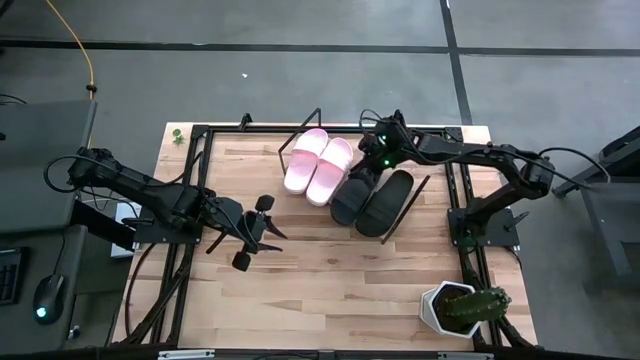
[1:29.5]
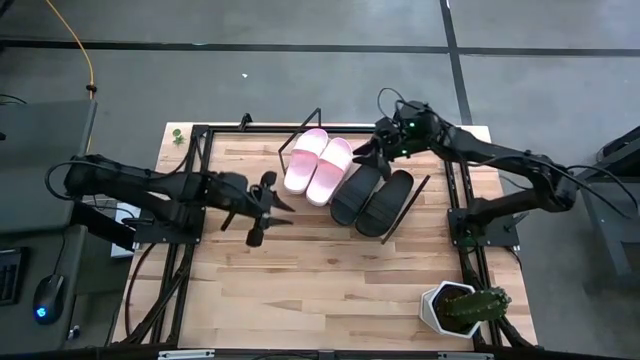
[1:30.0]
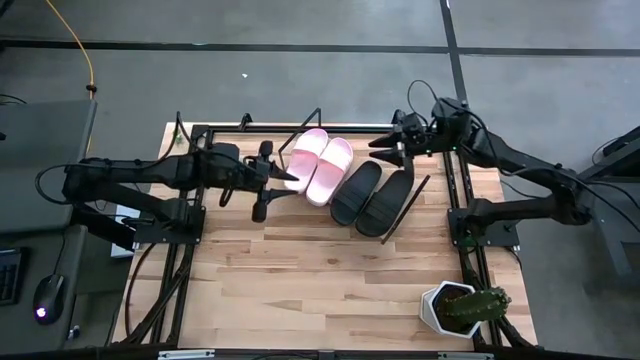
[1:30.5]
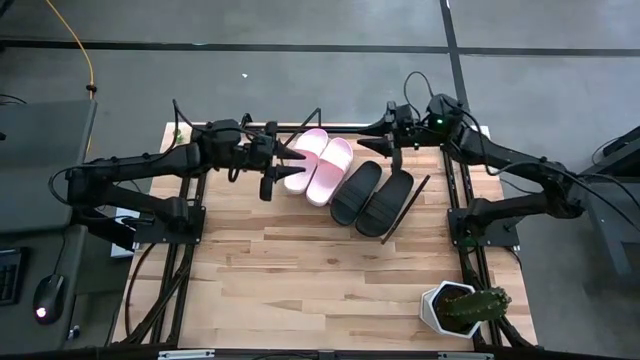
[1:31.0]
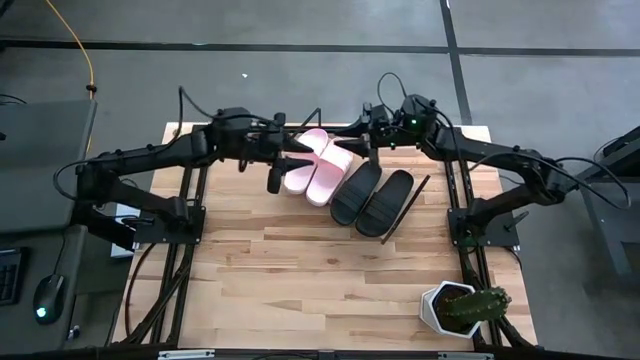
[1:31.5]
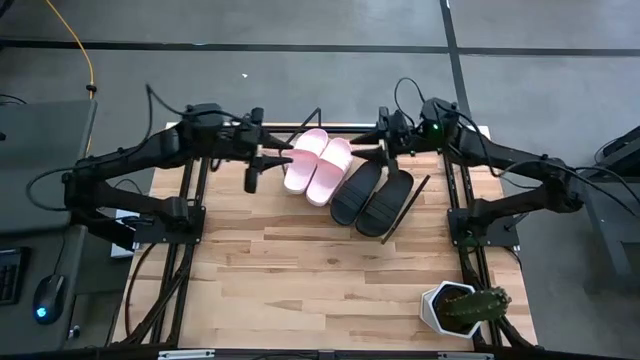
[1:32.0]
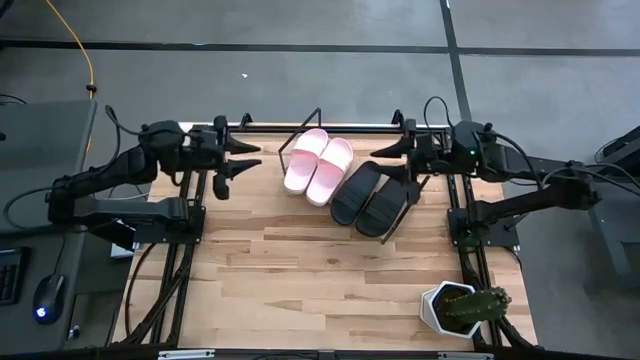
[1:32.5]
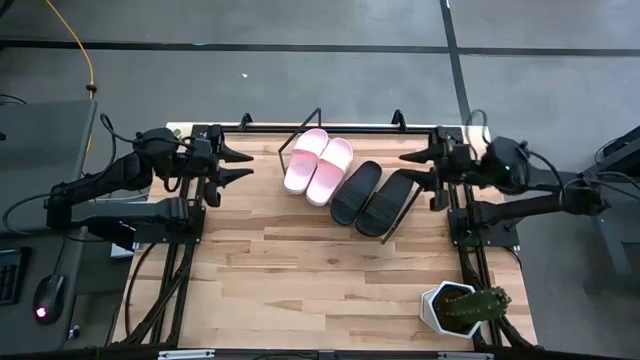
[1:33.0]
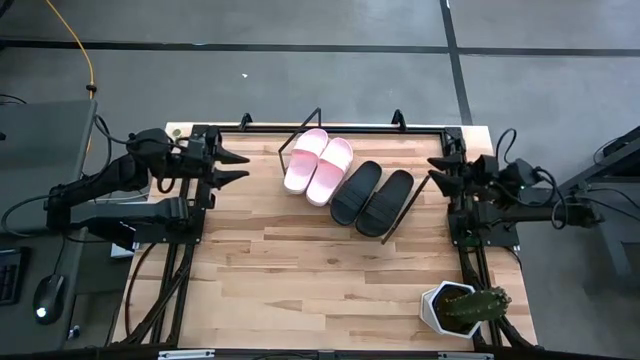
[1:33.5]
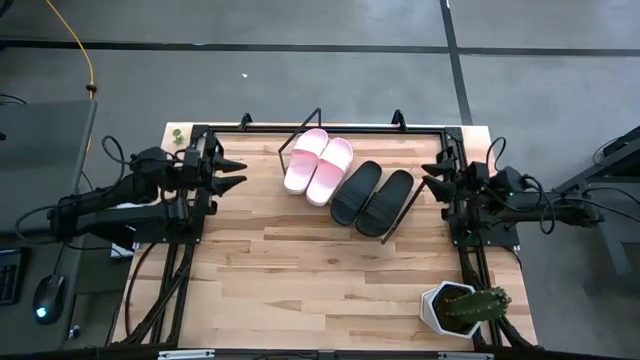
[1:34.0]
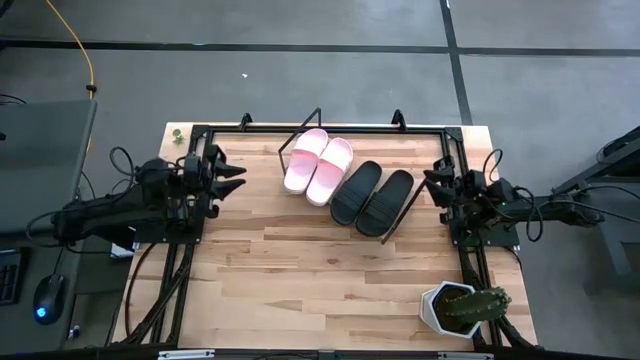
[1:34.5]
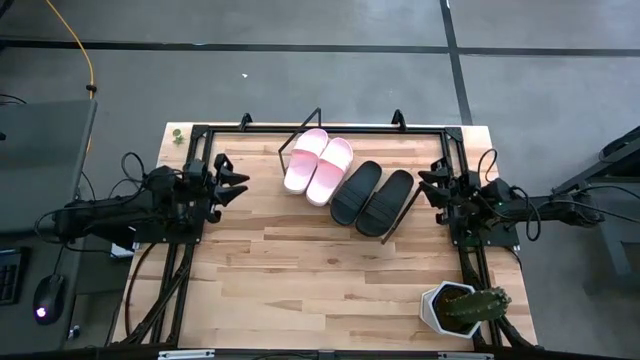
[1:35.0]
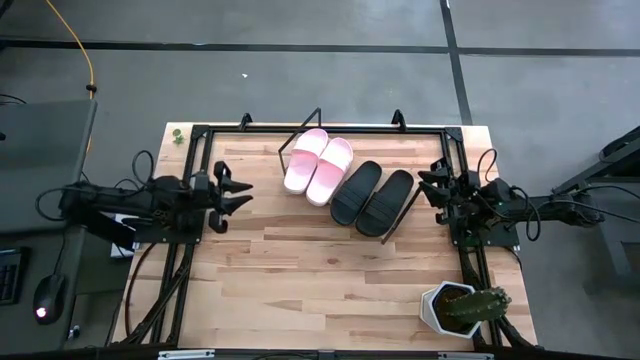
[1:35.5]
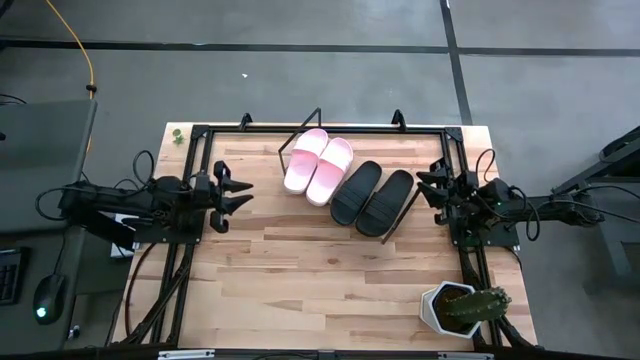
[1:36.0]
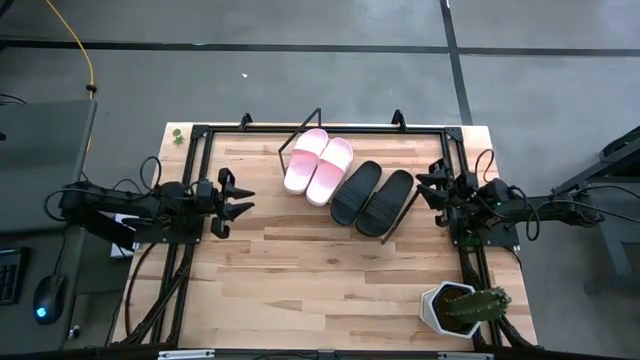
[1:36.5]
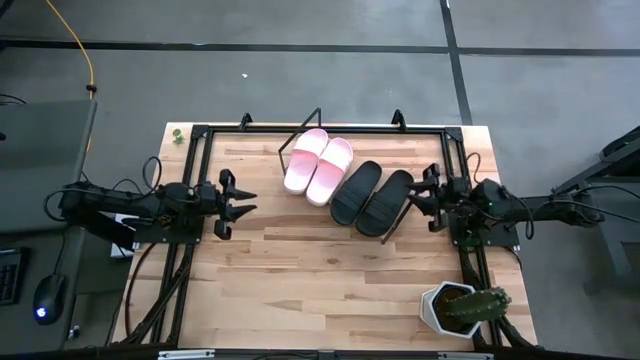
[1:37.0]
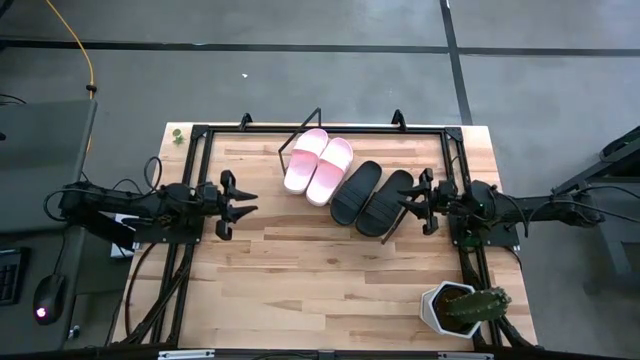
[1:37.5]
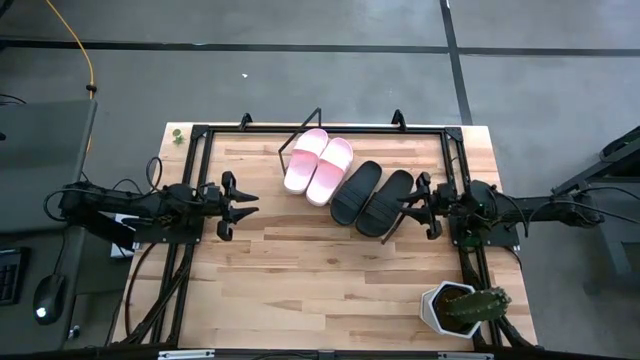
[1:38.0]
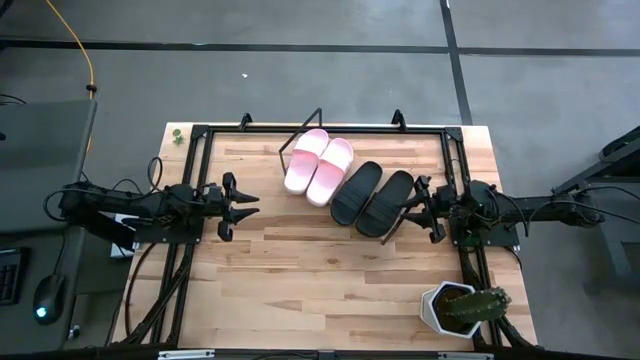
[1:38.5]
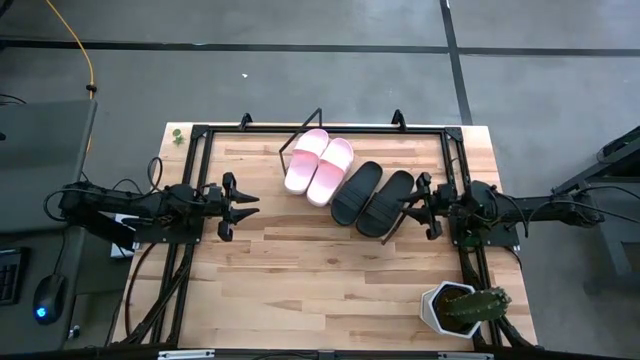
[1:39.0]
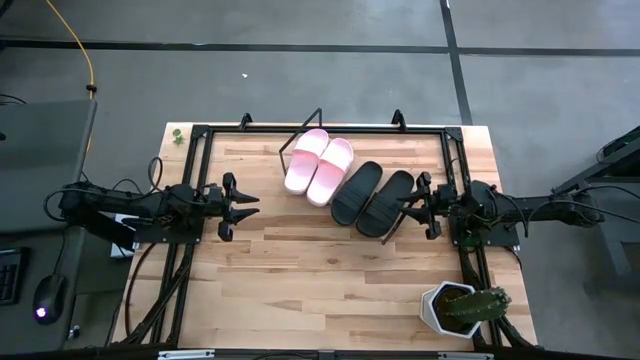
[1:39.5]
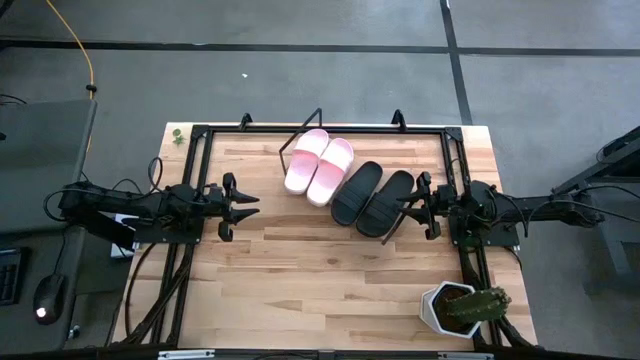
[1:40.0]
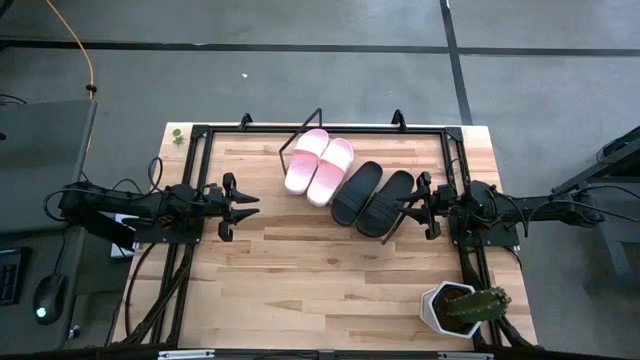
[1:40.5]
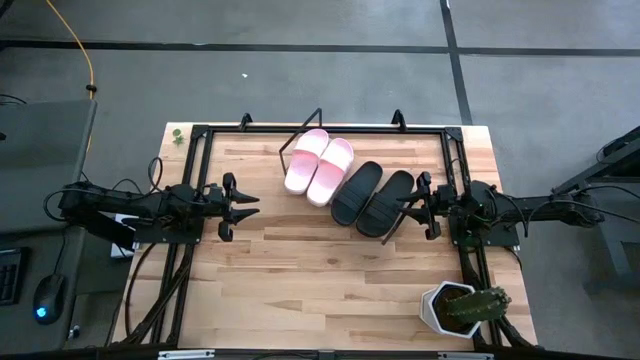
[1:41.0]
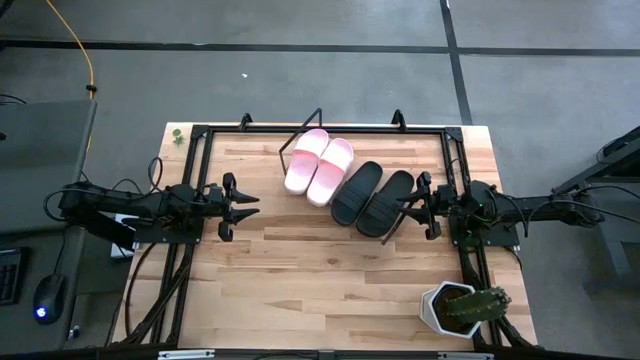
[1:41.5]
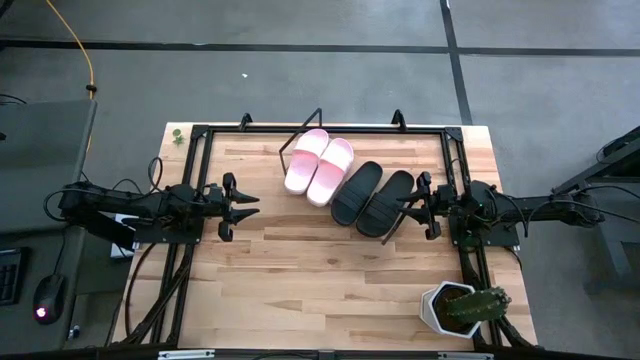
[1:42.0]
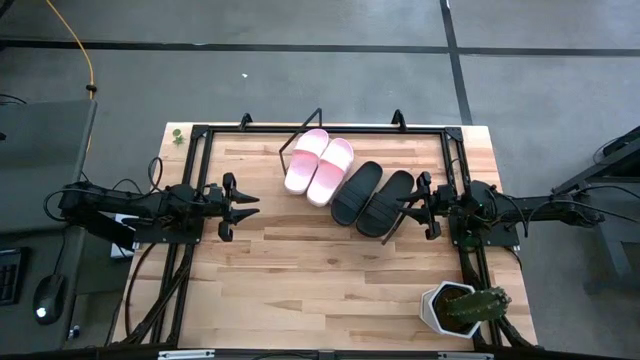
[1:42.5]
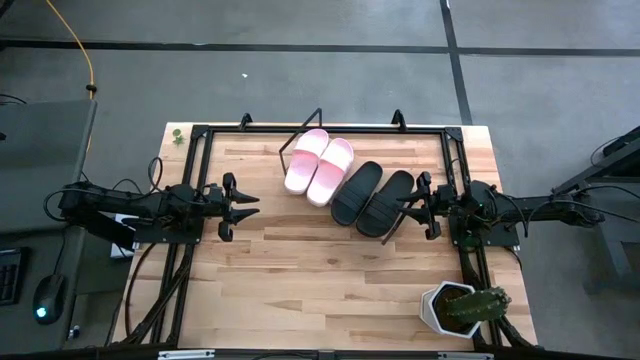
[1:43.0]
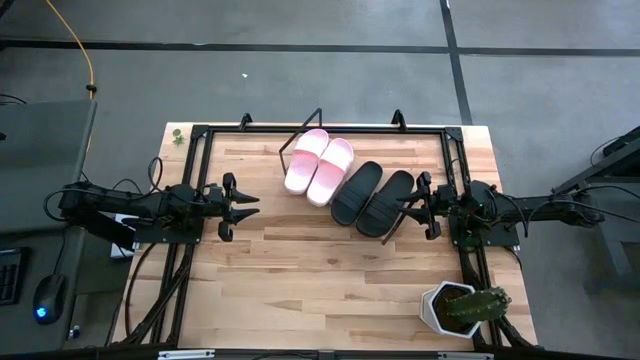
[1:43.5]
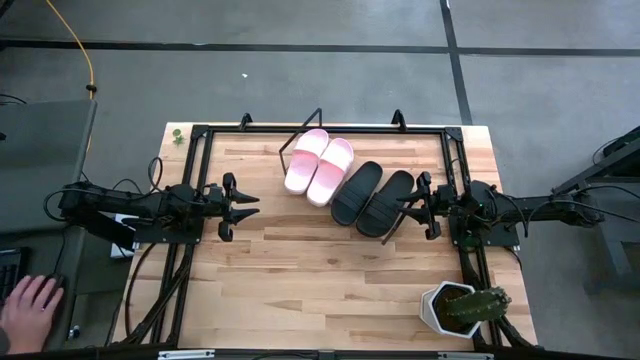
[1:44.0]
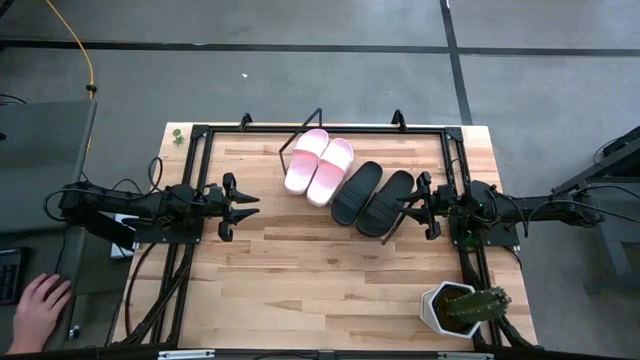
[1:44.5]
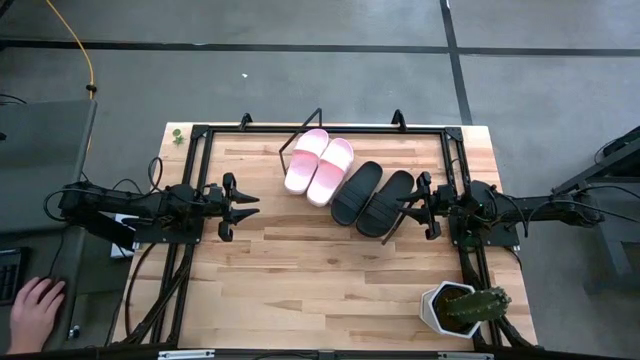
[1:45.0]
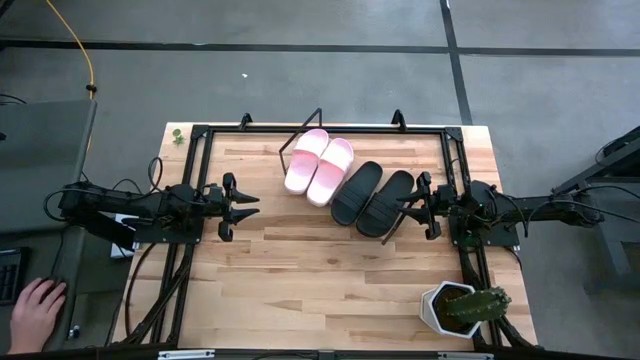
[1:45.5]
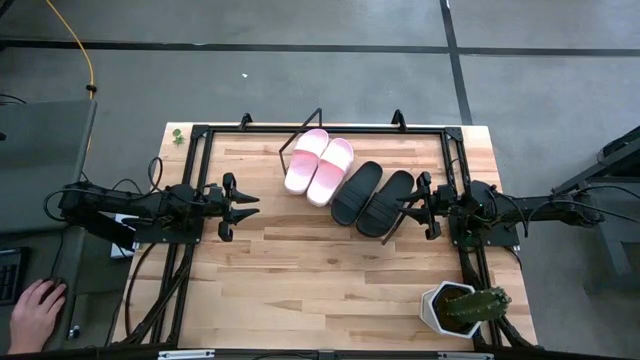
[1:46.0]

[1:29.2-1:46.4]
Task: Pick and place slides into the shelf
Return to Home Position

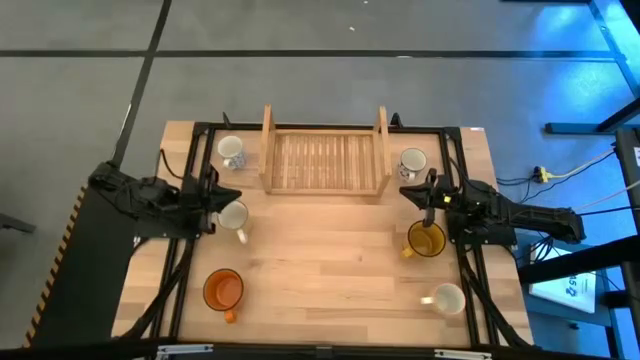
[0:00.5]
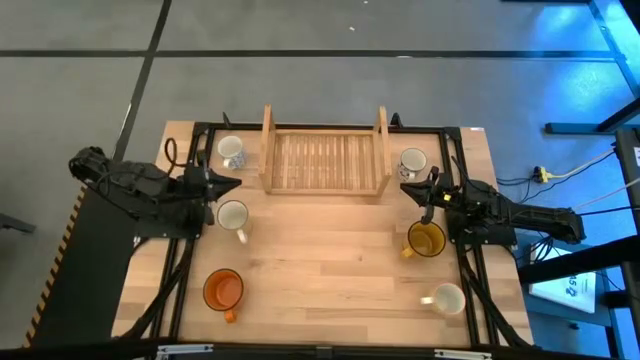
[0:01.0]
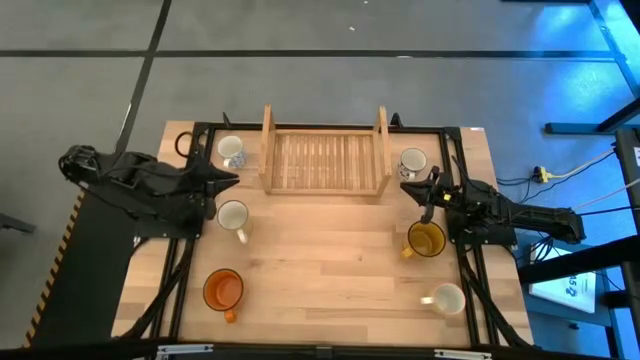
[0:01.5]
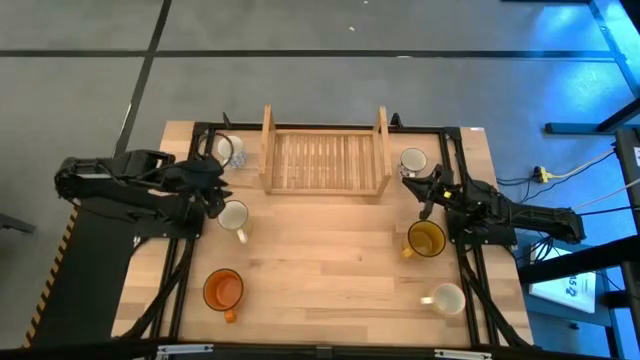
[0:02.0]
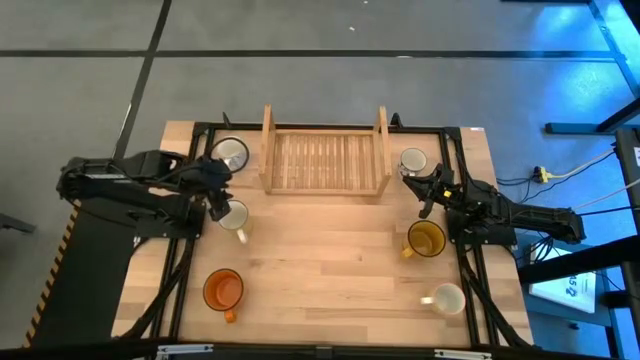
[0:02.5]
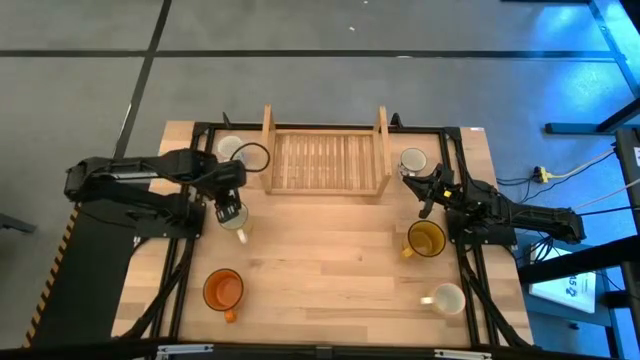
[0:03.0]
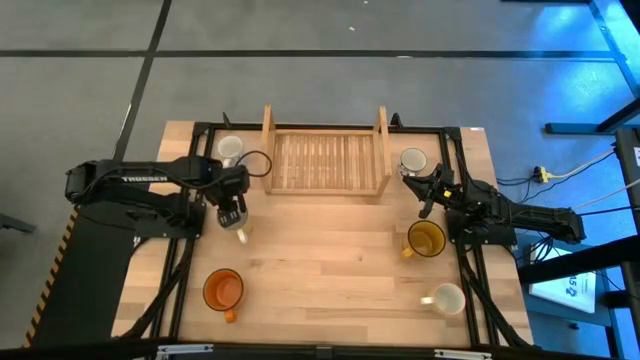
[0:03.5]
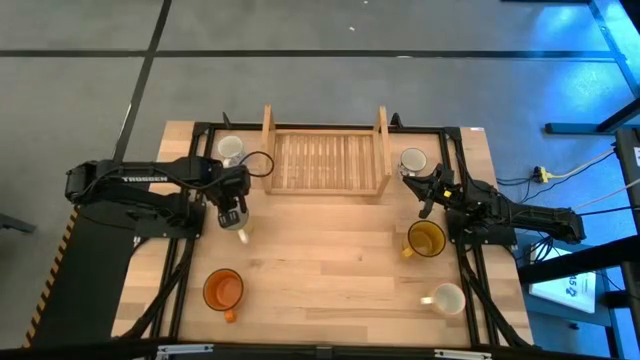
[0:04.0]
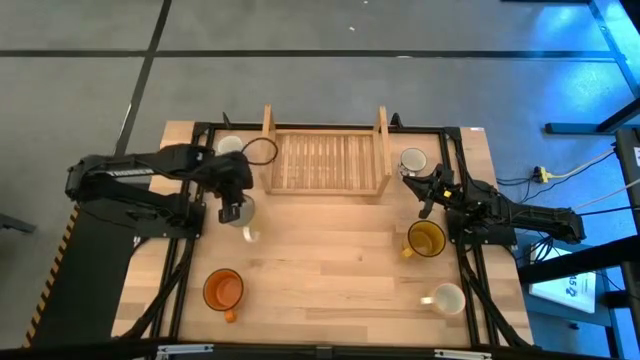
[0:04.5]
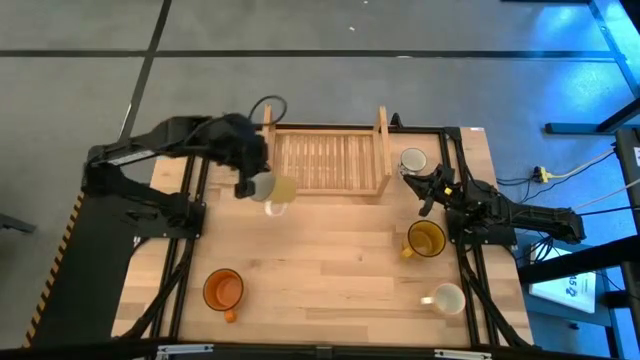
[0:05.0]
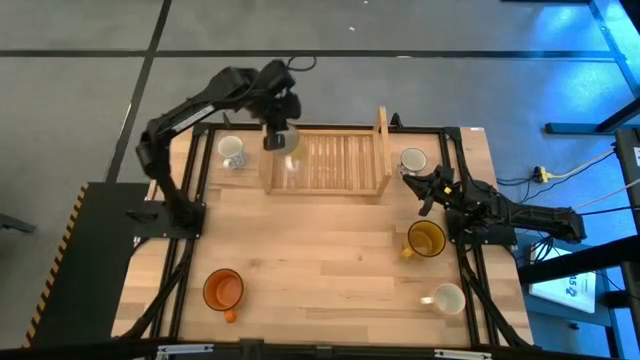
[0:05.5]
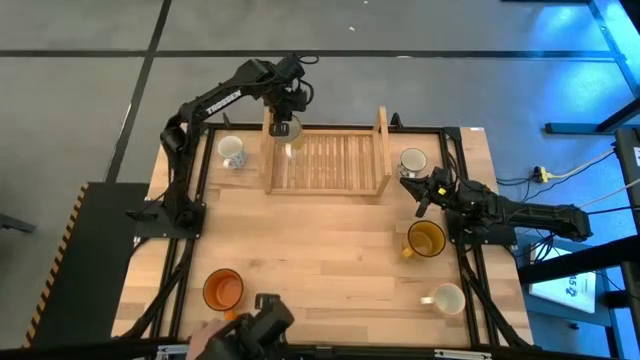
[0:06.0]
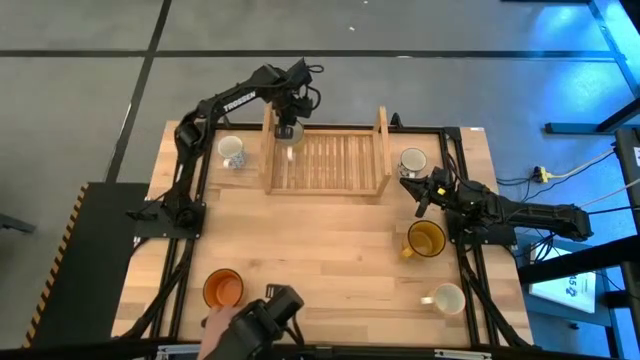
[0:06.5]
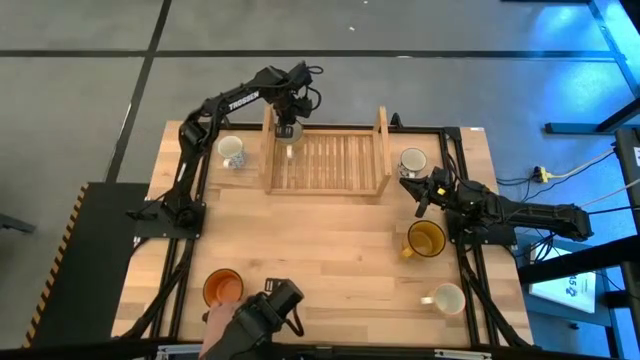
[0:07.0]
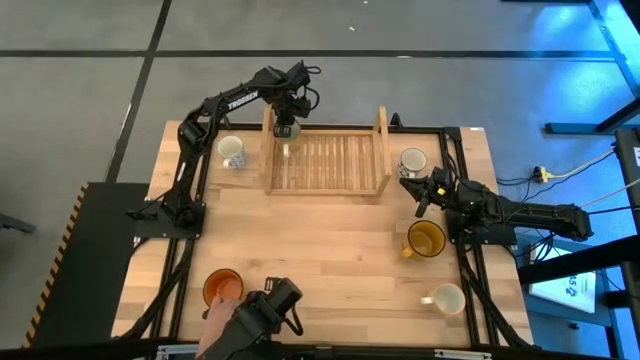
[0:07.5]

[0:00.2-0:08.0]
Task: Place coffee mugs
Put the yellow mug on the shelf
